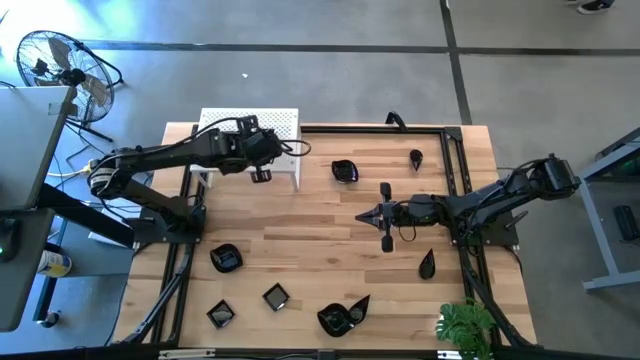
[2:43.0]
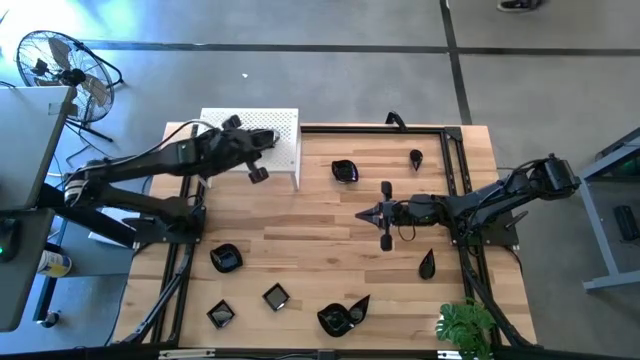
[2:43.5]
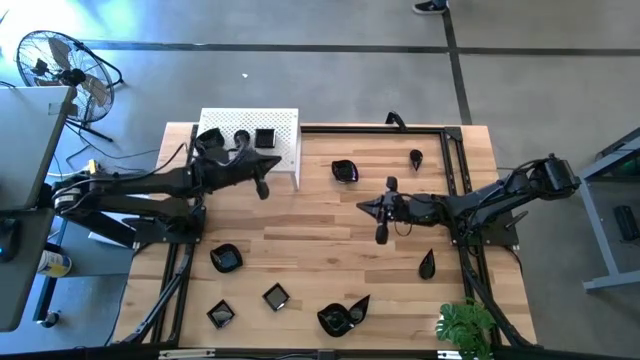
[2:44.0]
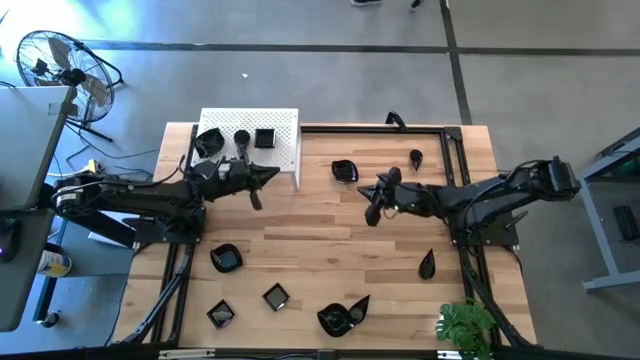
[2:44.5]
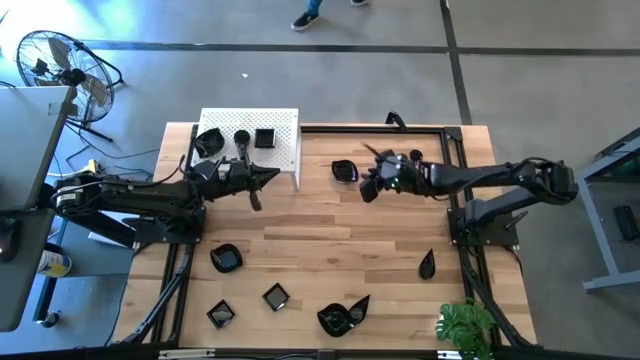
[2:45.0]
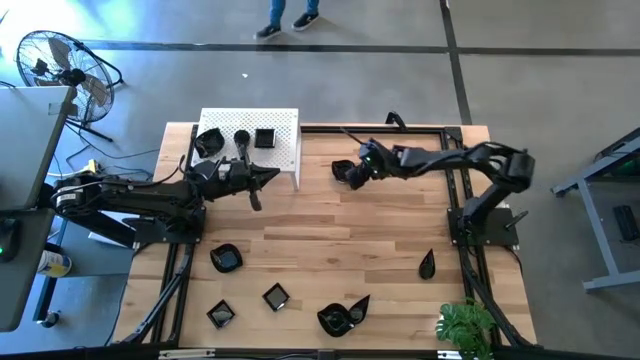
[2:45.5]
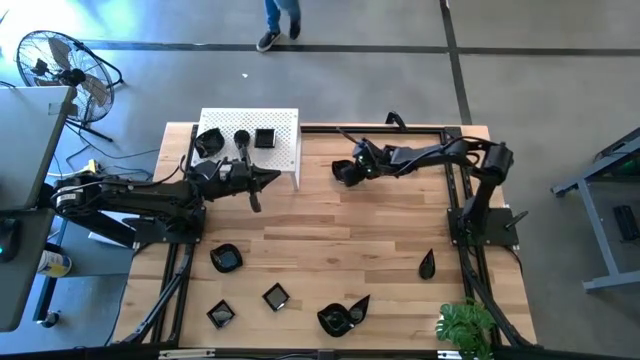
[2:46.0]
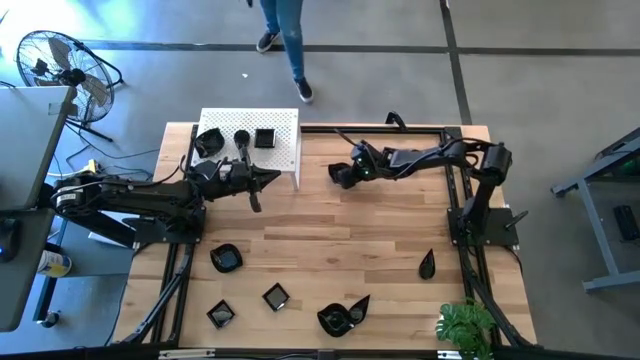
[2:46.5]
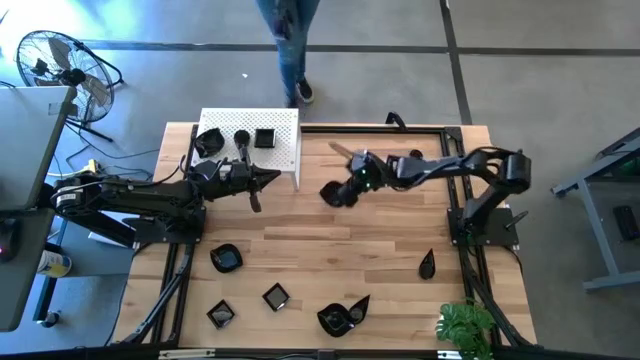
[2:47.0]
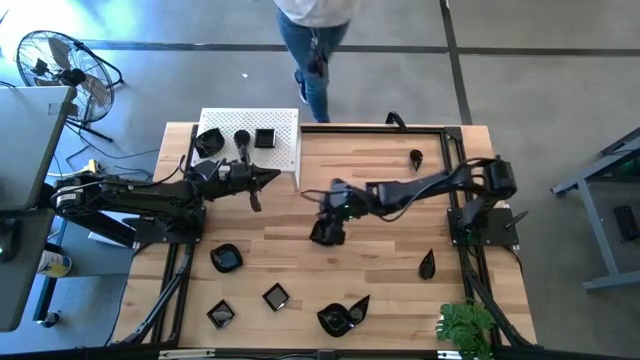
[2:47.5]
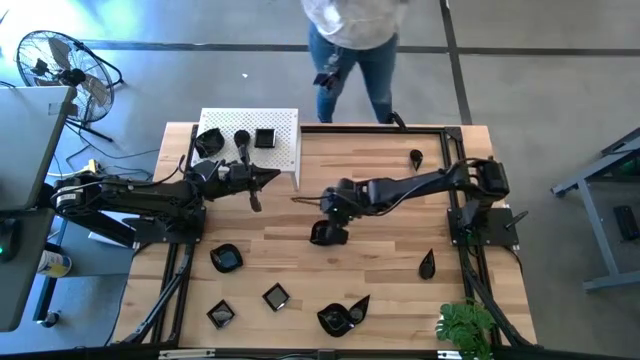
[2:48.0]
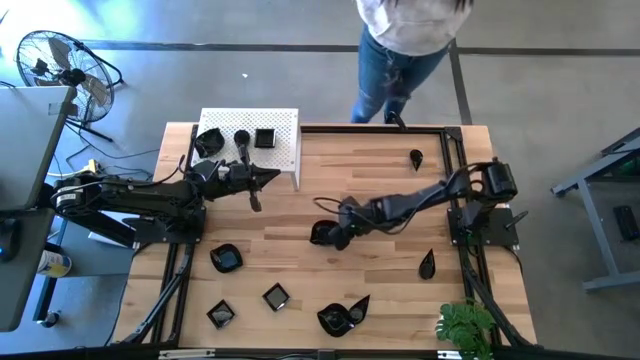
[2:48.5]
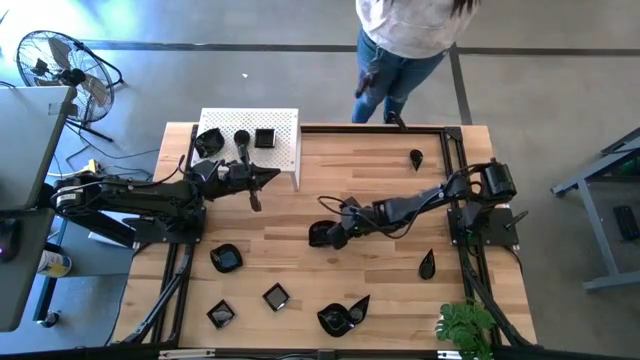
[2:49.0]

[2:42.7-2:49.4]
Task: Pick & Place Mini shaped plates
Stack the top black leaf shaped plate on top of the stacked black leaf shaped plates on the shelf

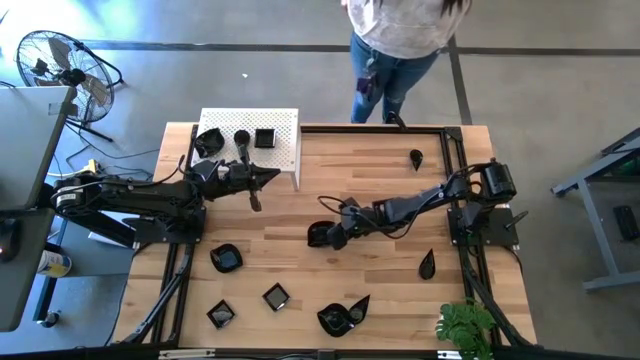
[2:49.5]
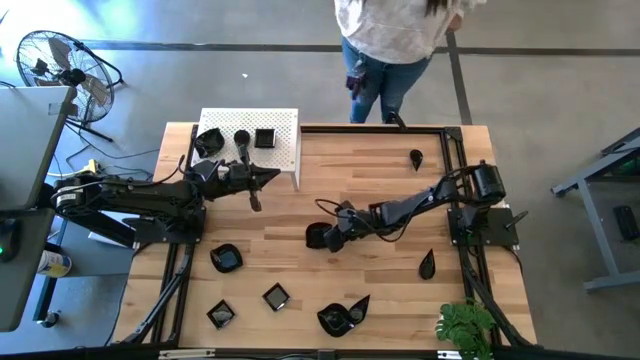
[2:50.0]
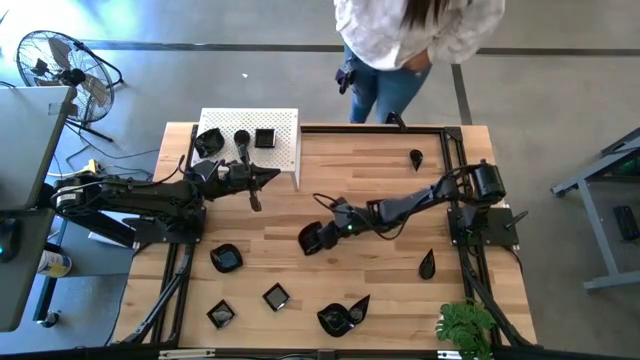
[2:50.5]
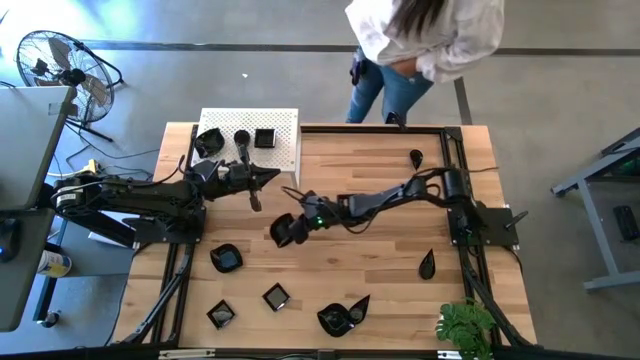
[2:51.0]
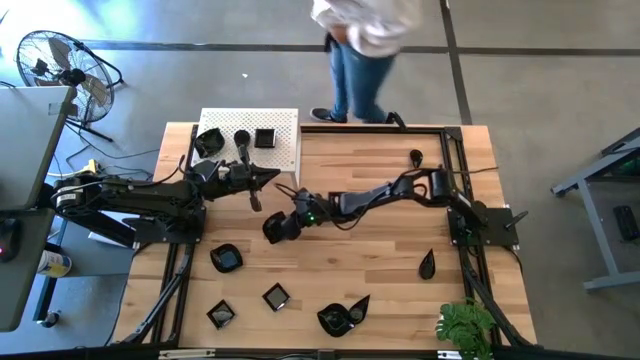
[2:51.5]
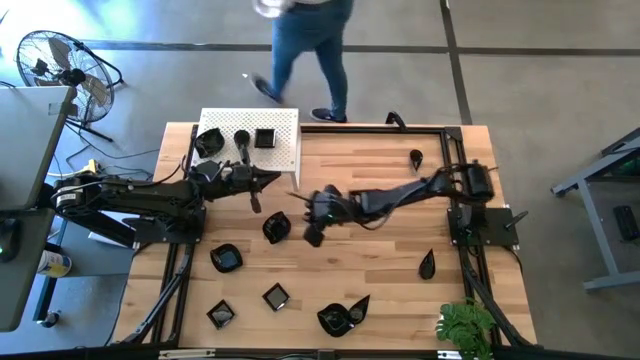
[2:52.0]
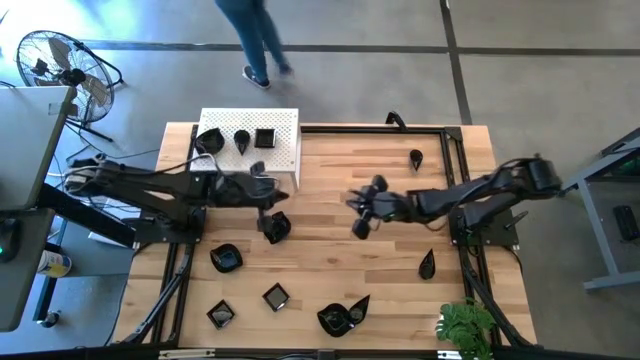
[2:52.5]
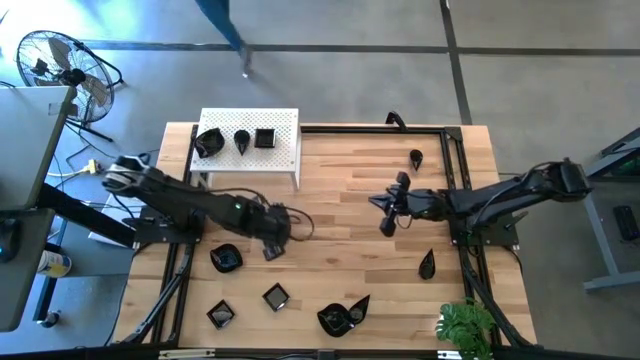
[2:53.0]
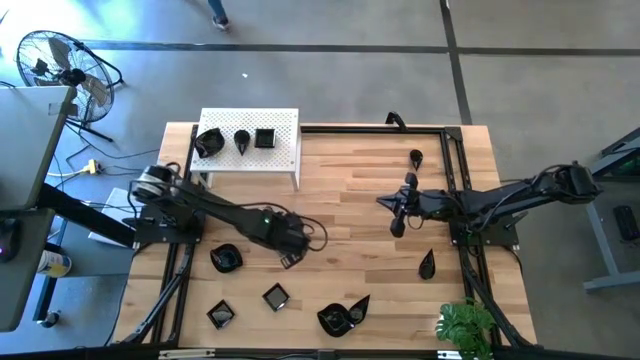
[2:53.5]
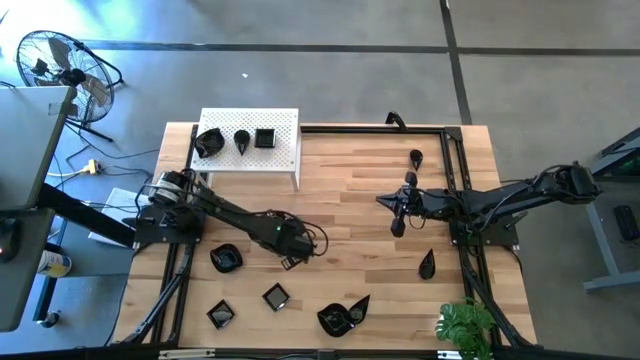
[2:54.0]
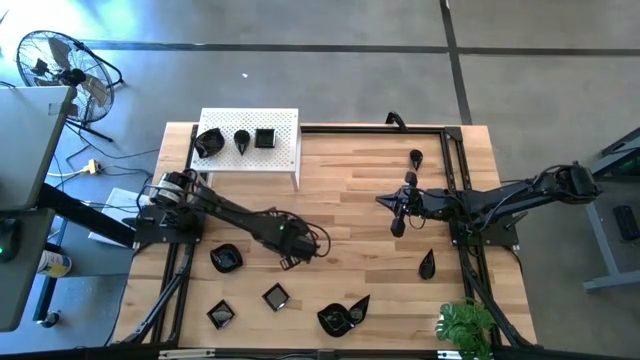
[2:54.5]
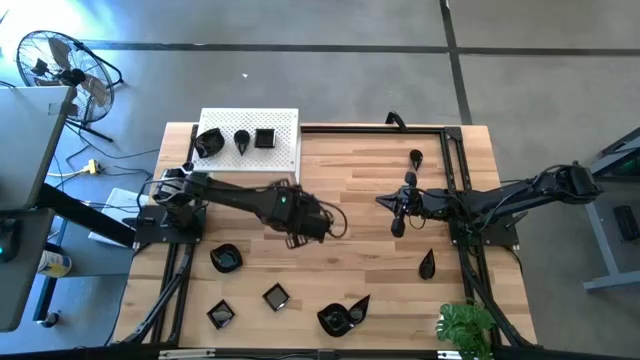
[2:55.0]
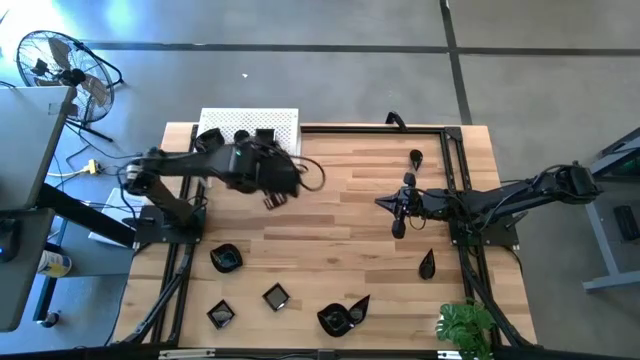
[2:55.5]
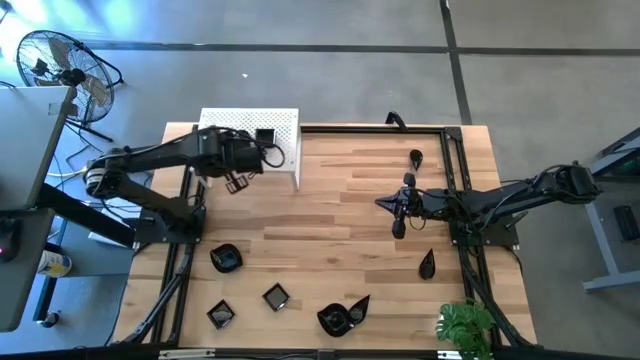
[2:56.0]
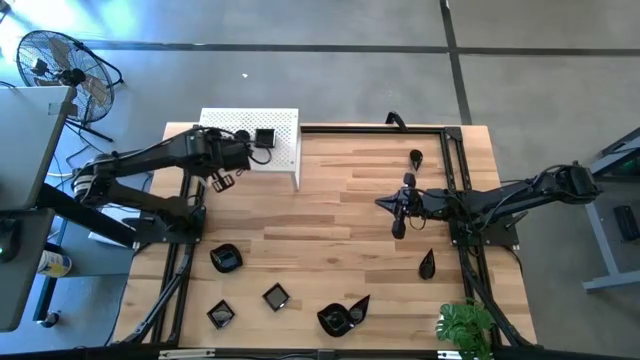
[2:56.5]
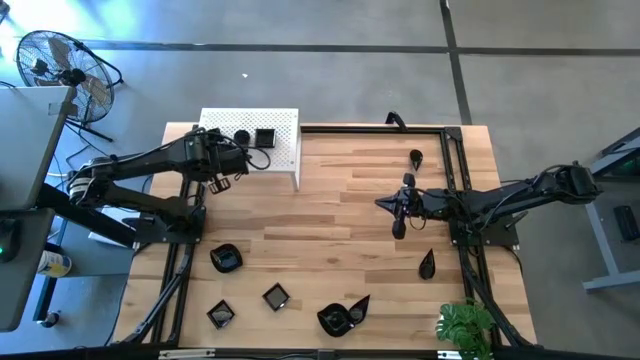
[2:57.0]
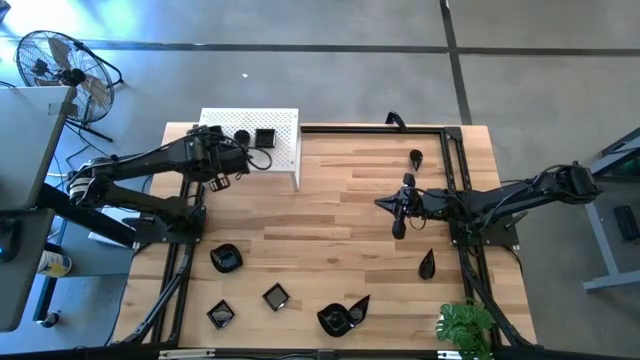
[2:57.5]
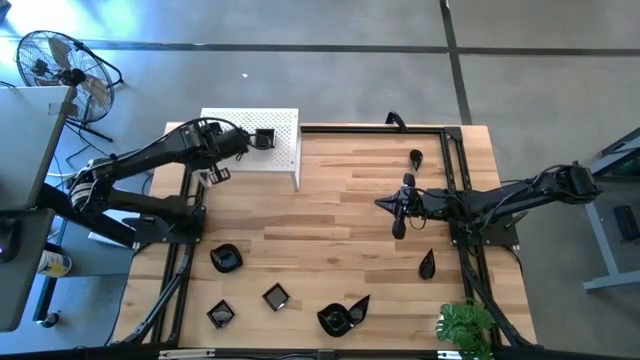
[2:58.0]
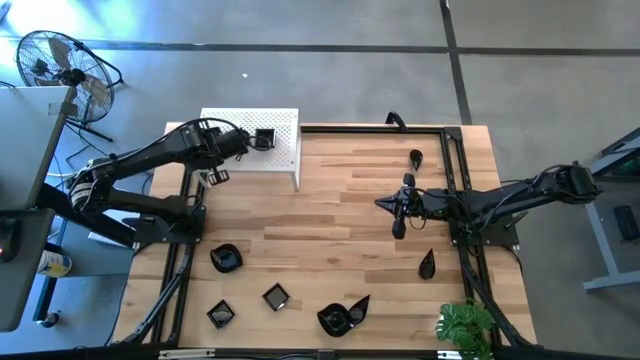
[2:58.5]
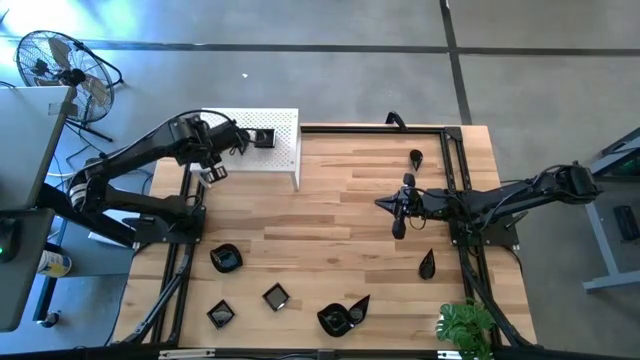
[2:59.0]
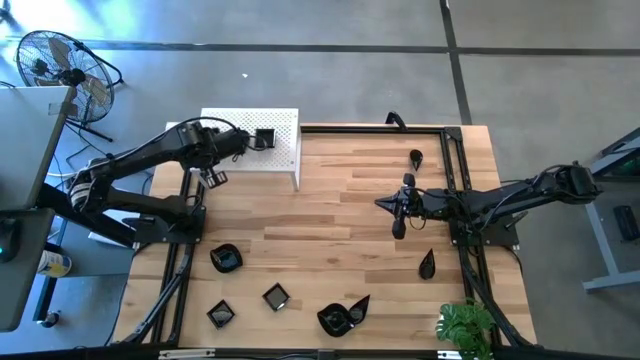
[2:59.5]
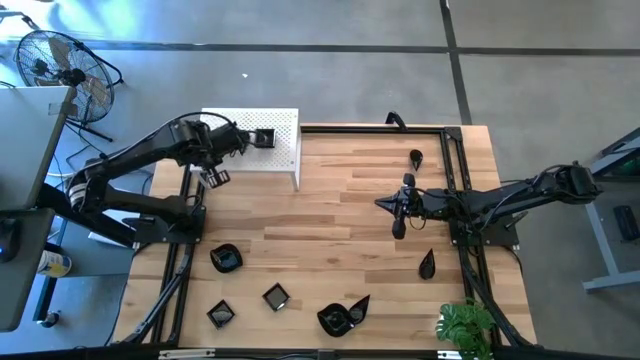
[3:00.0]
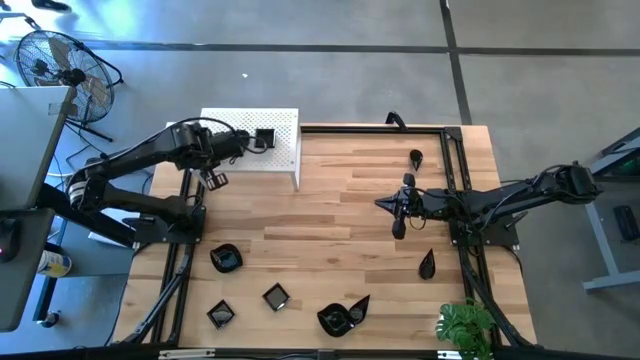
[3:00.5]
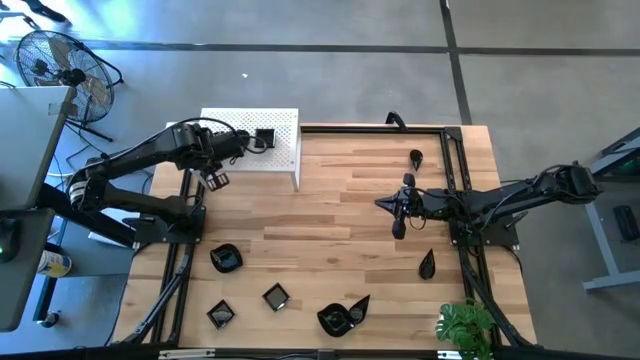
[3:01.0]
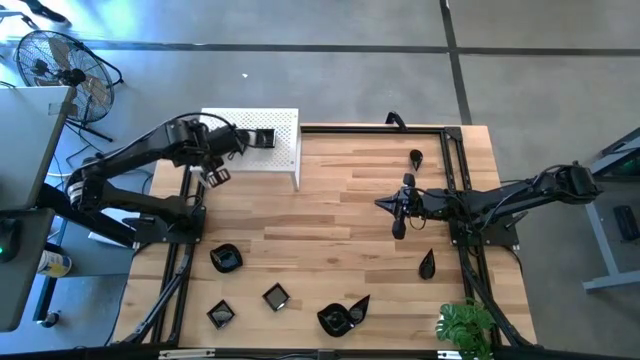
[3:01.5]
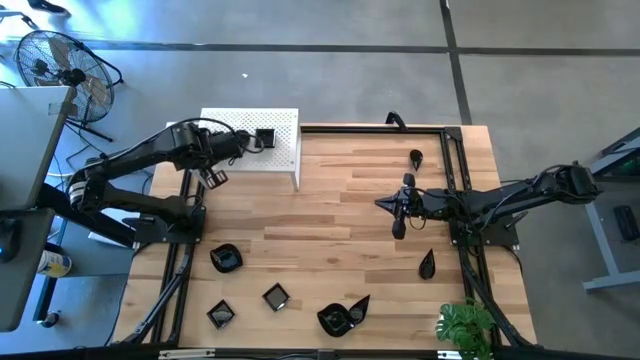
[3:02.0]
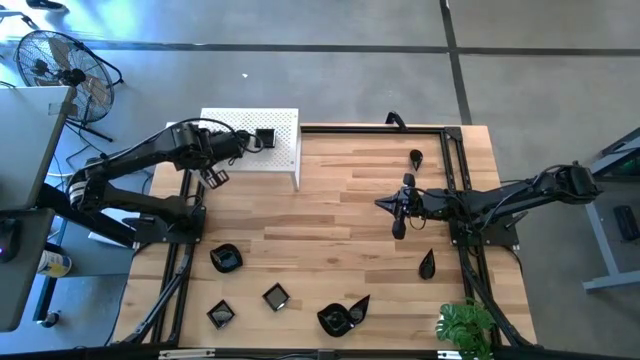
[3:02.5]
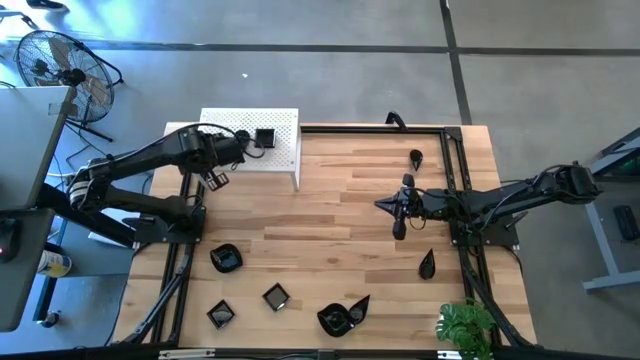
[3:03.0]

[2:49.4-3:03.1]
Stack the top black leaf shaped plate on top of the stacked black leaf shaped plates on the shelf
